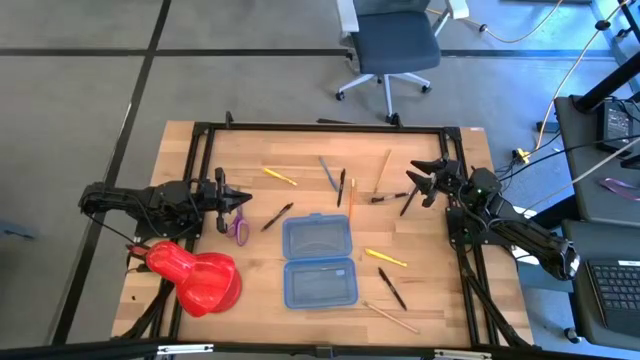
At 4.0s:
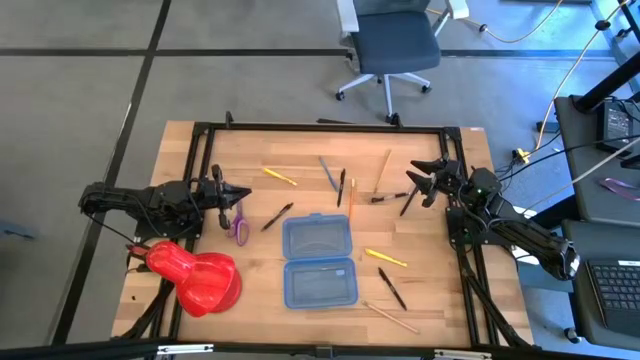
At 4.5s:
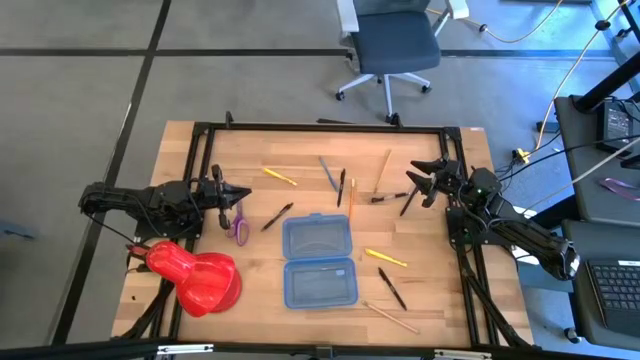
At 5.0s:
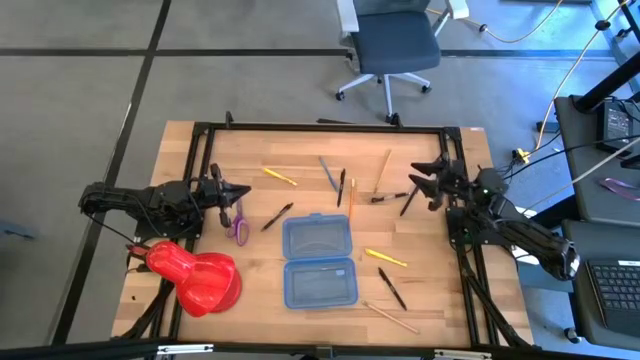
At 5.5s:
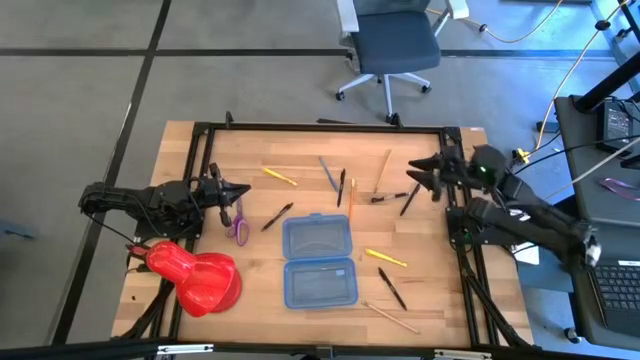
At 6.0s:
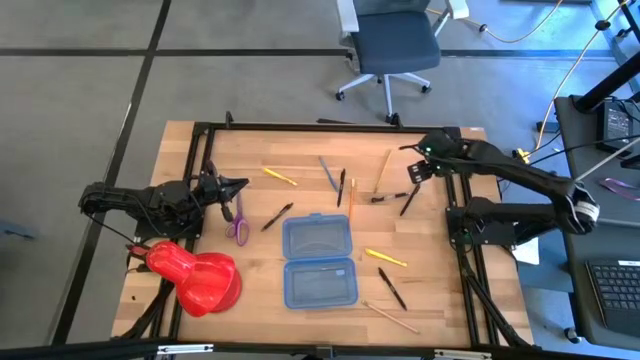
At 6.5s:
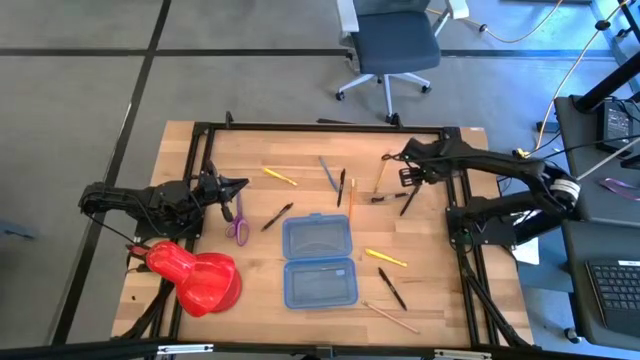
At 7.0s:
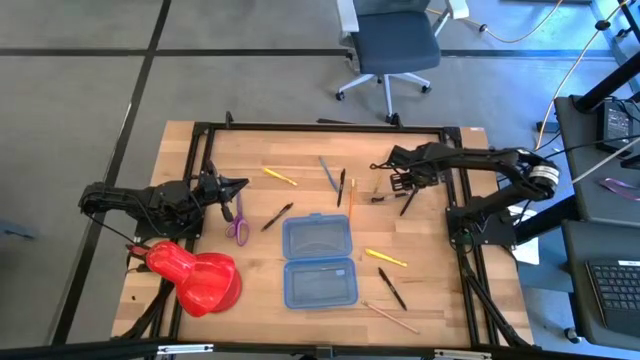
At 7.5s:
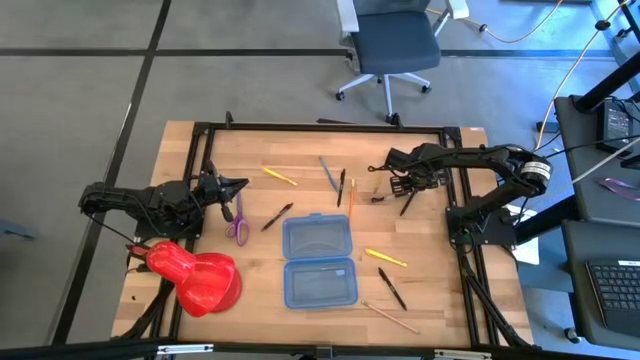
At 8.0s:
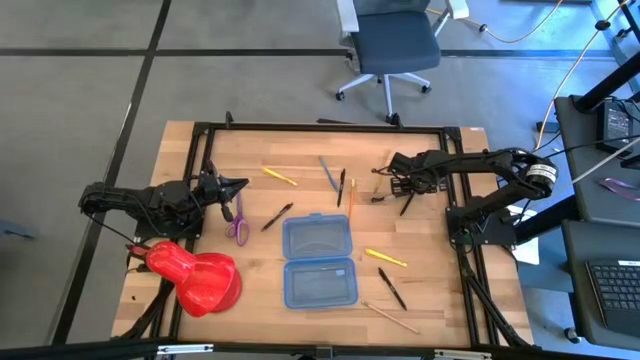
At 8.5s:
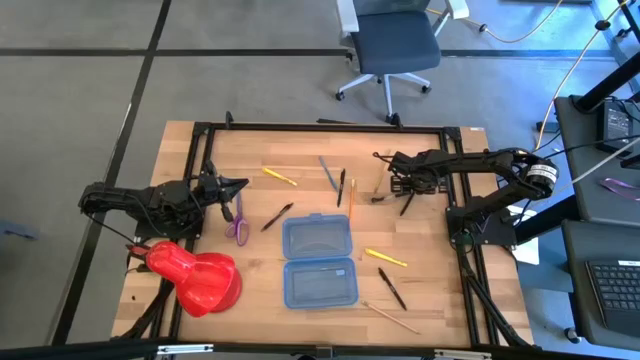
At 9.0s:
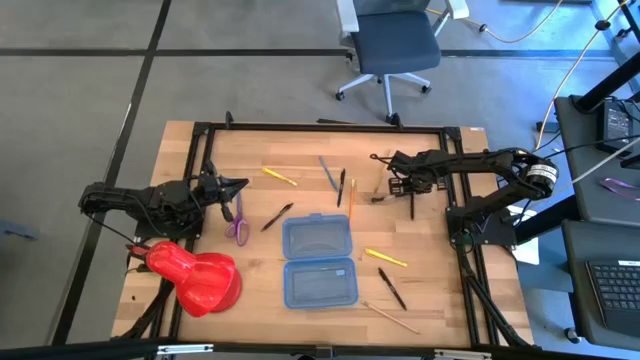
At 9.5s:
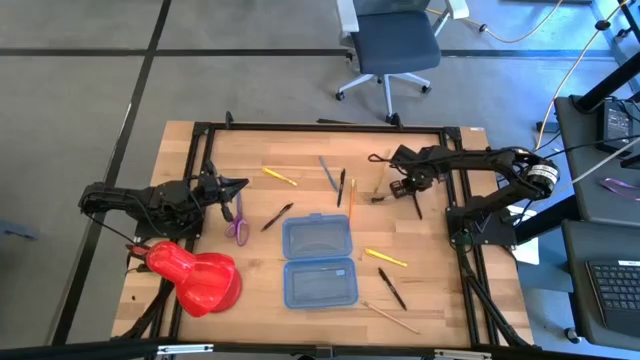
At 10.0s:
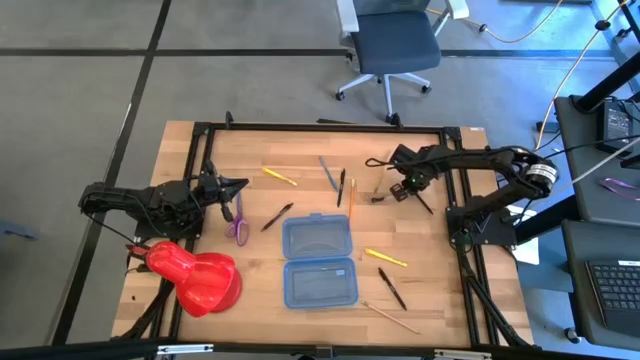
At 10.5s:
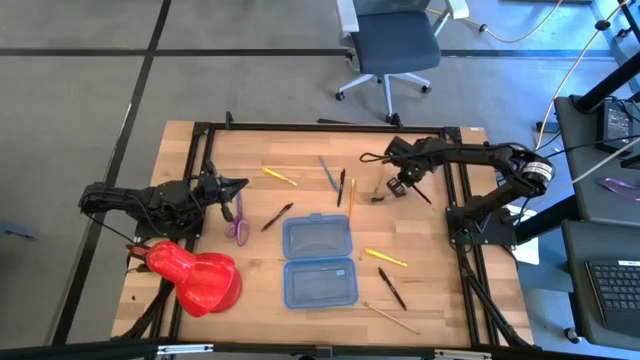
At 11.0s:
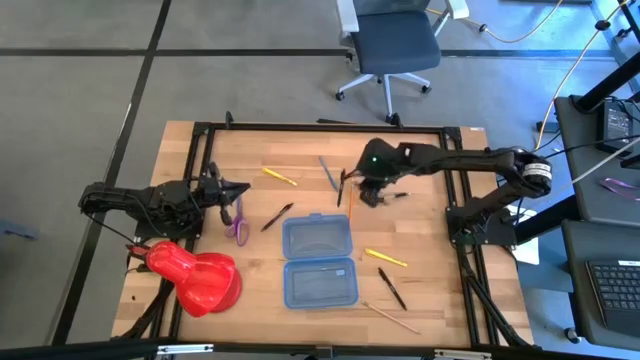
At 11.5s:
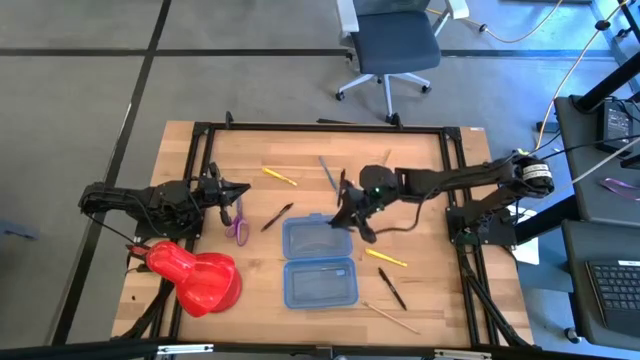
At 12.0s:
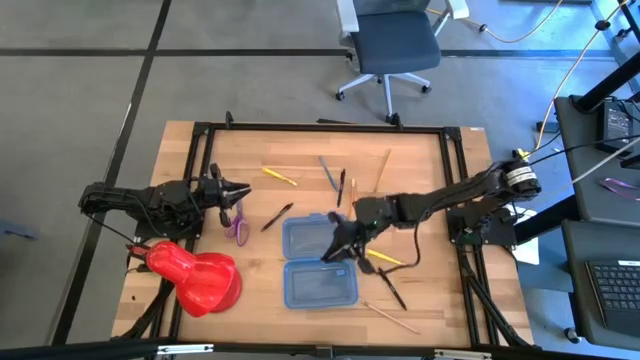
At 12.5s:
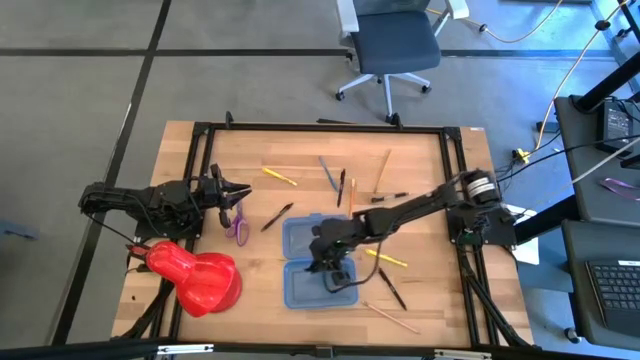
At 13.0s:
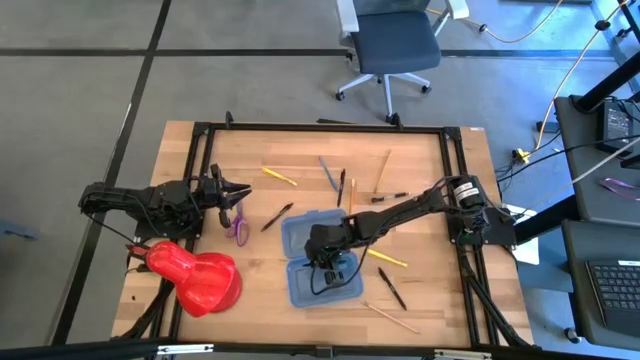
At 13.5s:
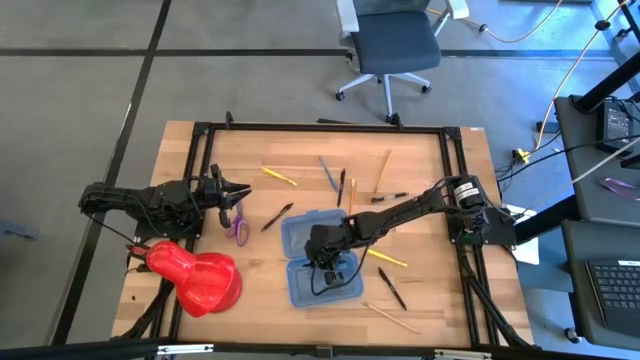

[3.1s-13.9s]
Task: Pick & place school supplies into a supply box
Put the top right black pen into the blue supply box

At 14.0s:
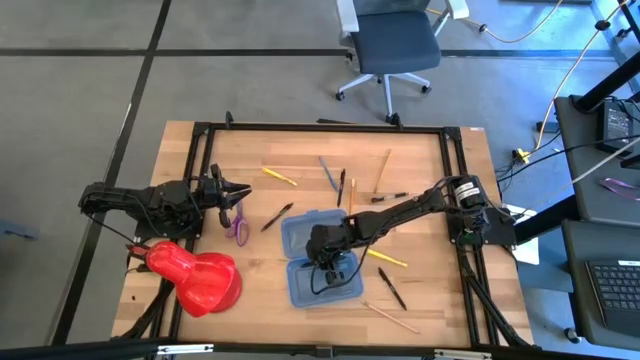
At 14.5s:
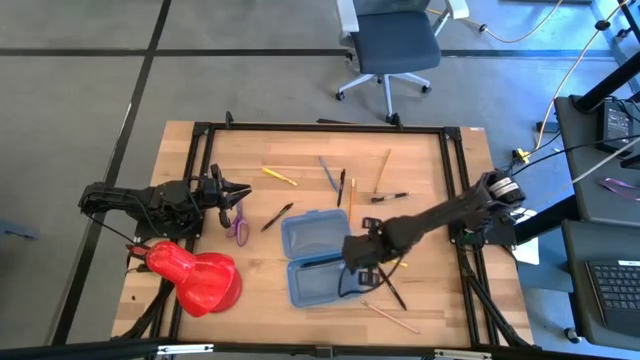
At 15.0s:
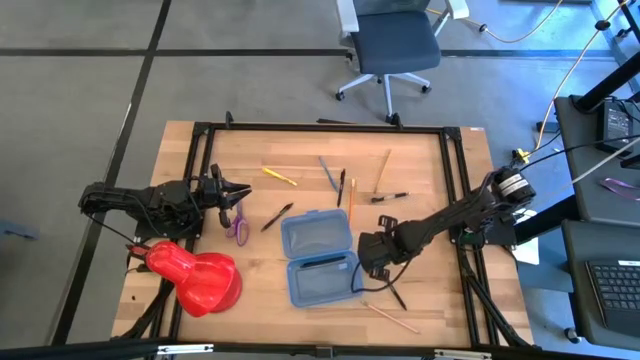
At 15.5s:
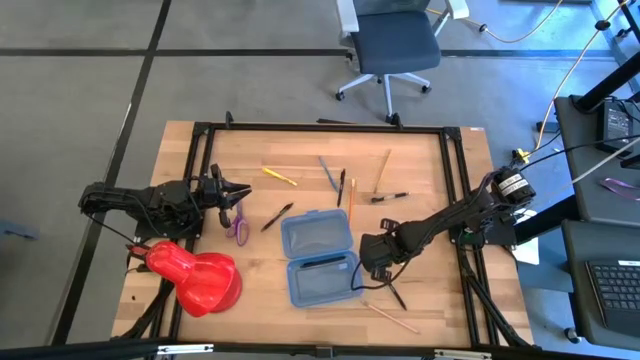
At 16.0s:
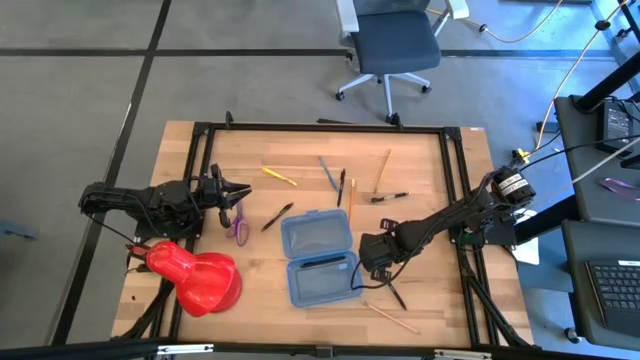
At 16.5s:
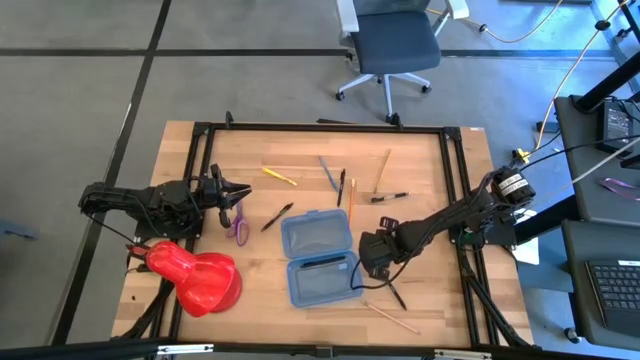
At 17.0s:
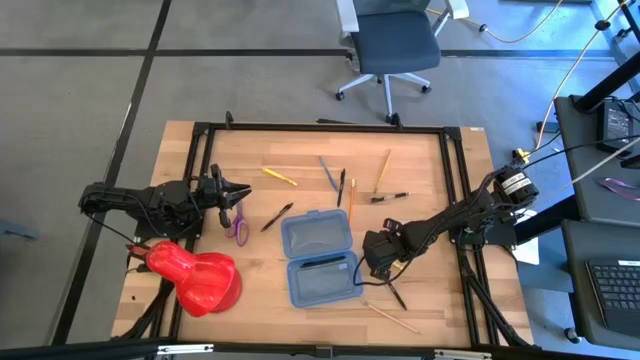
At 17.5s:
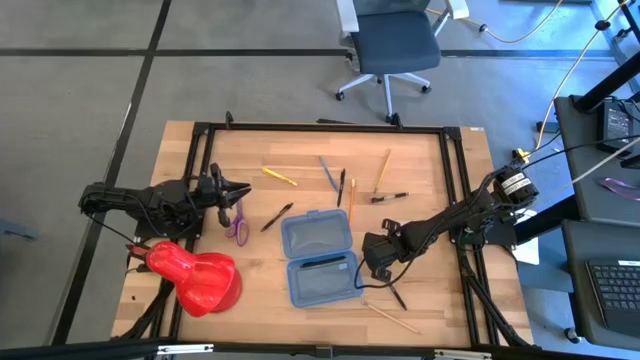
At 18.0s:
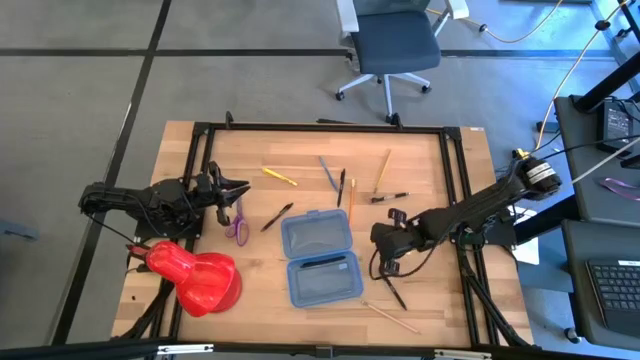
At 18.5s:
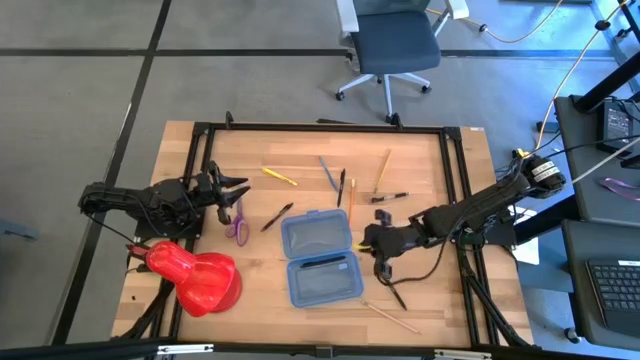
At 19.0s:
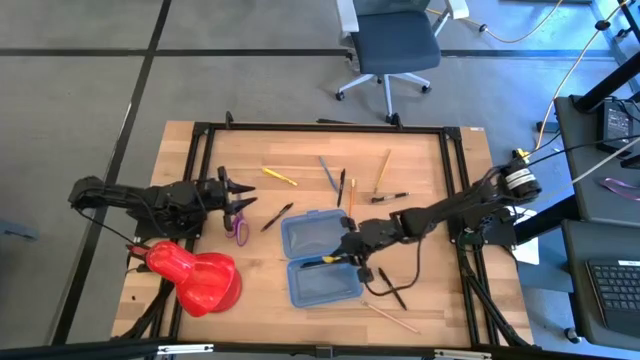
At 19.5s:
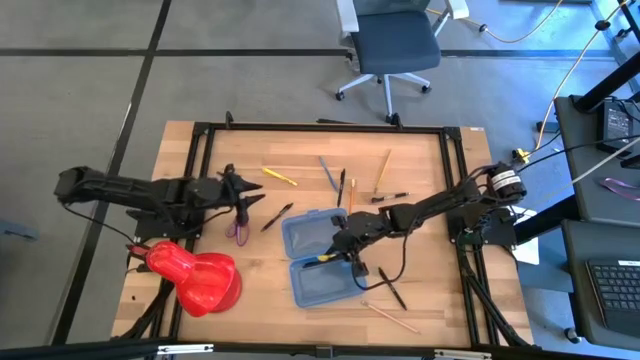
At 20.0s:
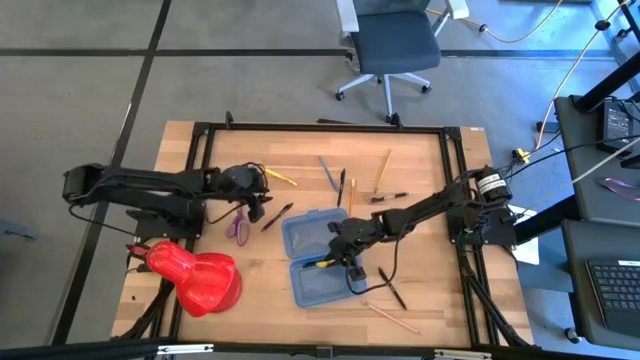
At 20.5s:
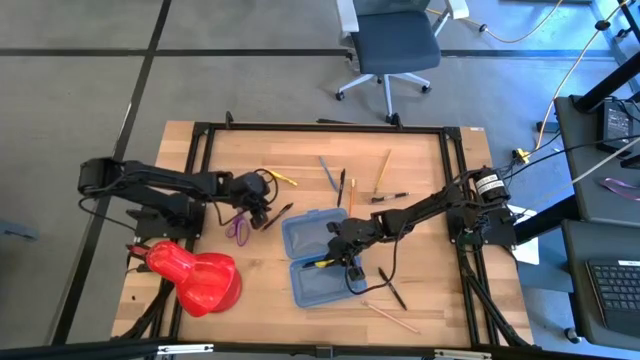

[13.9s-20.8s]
Put the middle right yellow pen into the blue supply box

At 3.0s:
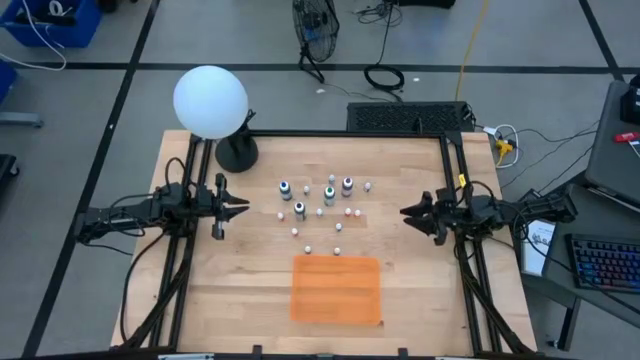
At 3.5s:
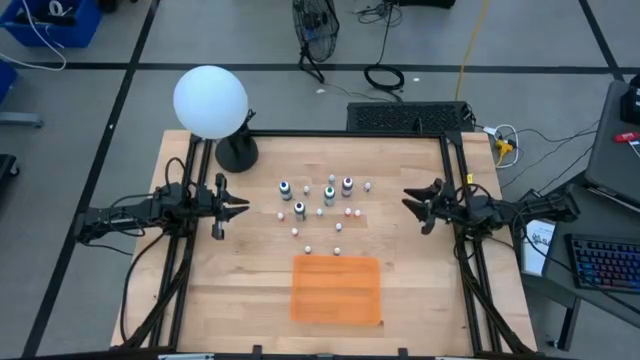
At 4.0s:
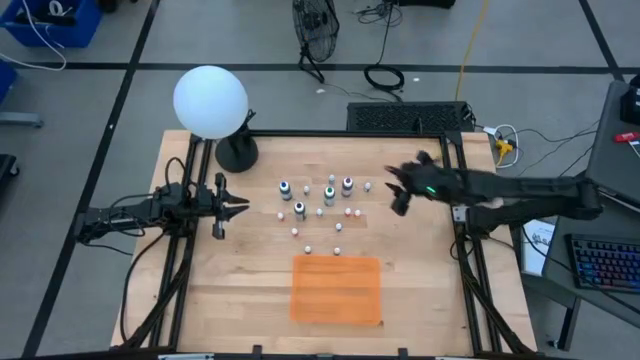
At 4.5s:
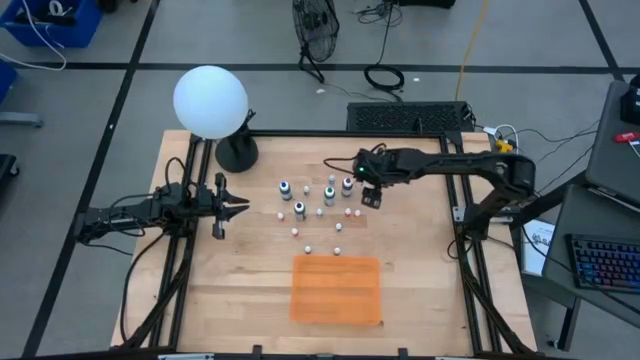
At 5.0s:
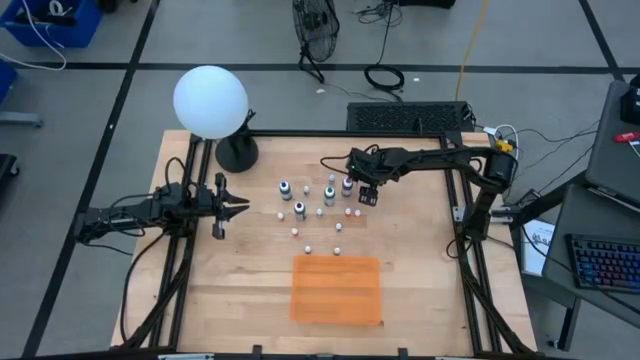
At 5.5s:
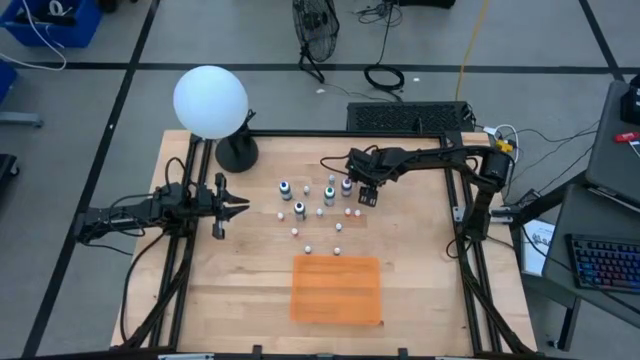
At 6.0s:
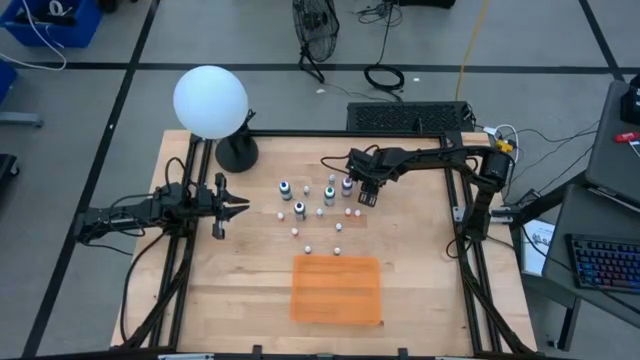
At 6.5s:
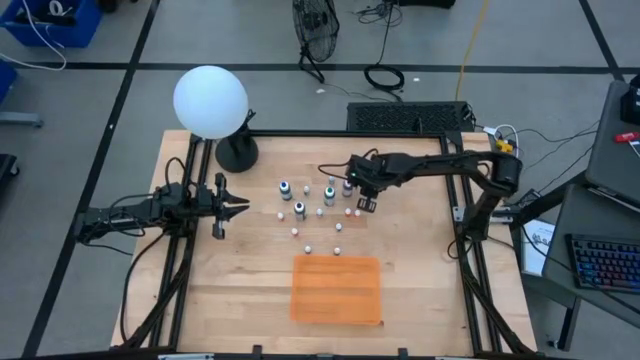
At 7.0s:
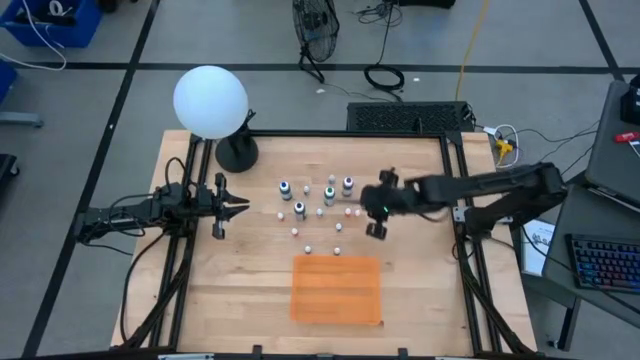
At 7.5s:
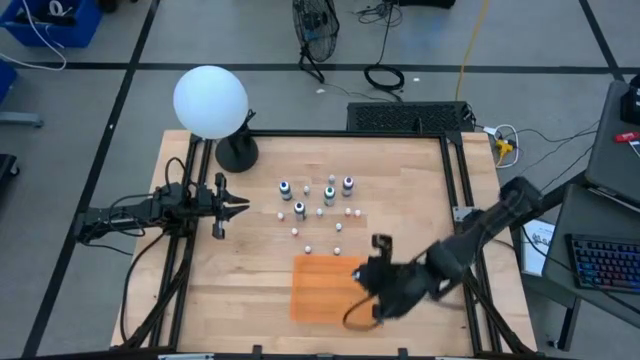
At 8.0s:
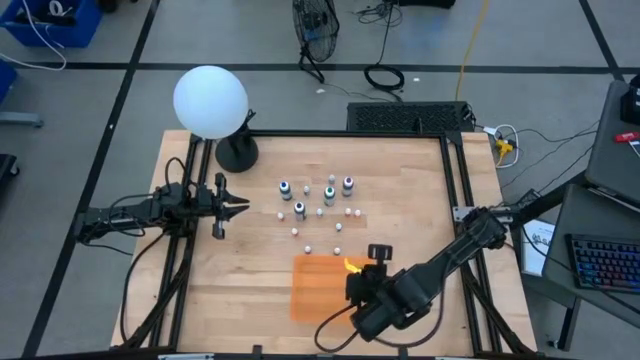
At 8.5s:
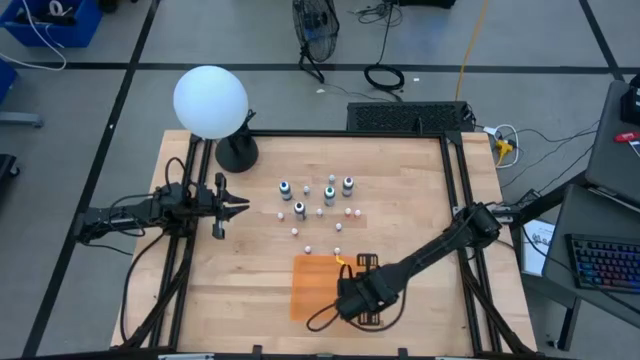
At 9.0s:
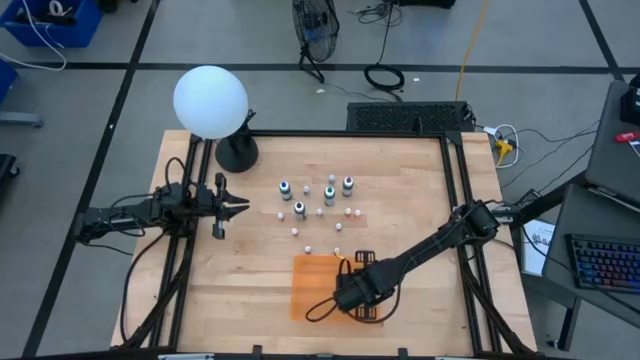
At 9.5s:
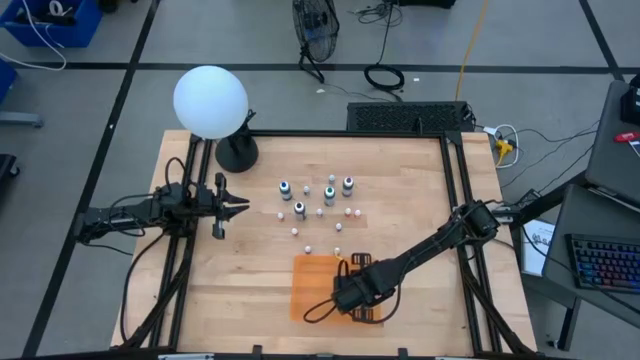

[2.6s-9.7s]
Task: Pick & Place food coloring
Put the small blue food coloring bottle into the orange container
